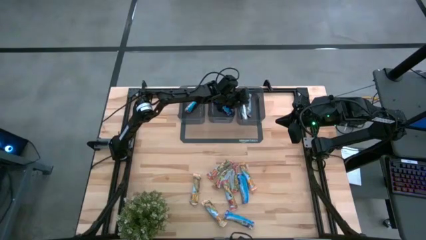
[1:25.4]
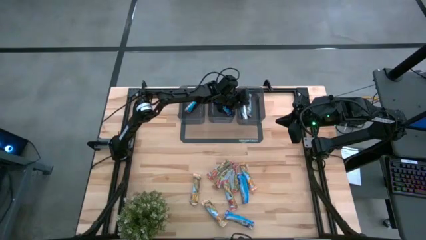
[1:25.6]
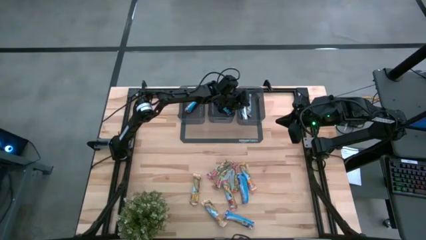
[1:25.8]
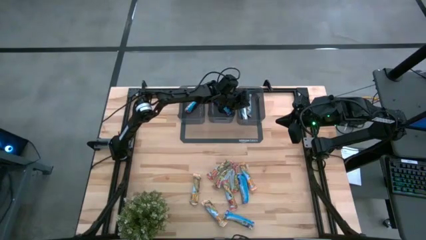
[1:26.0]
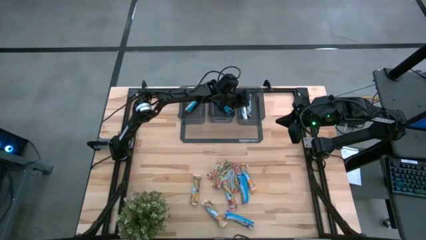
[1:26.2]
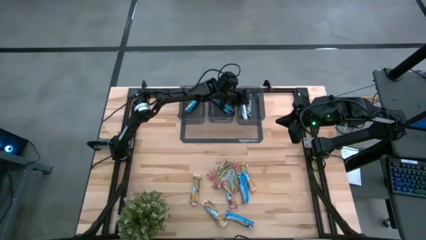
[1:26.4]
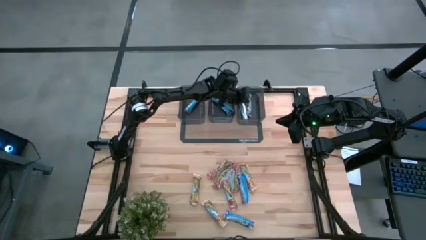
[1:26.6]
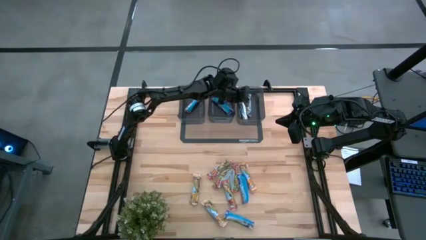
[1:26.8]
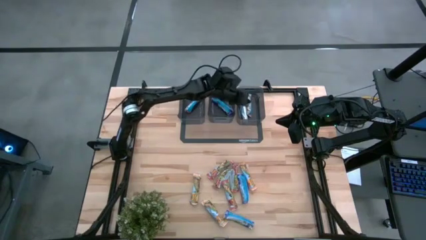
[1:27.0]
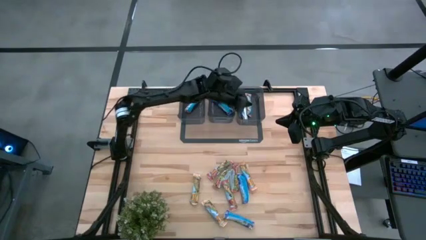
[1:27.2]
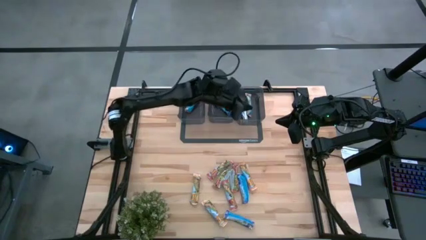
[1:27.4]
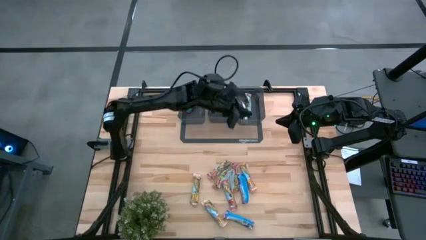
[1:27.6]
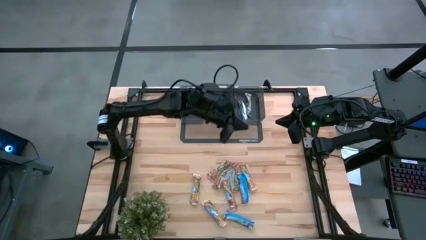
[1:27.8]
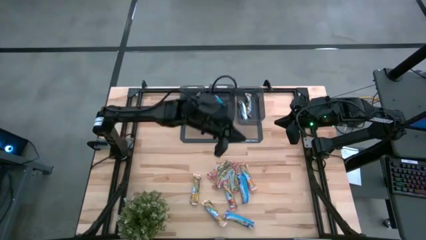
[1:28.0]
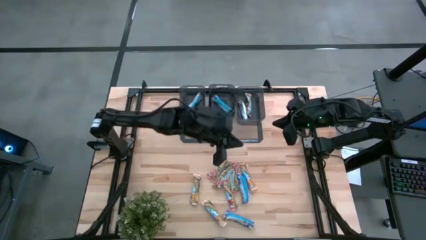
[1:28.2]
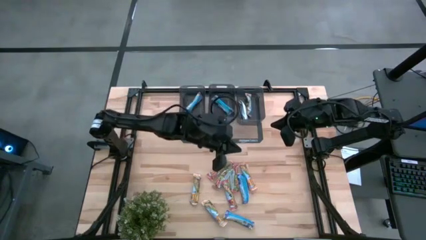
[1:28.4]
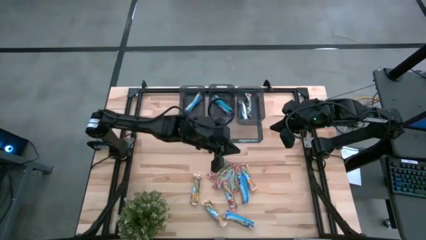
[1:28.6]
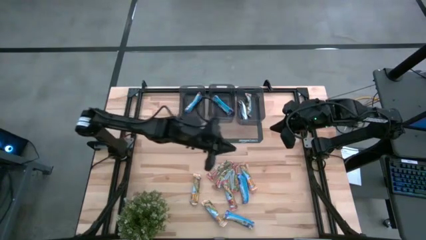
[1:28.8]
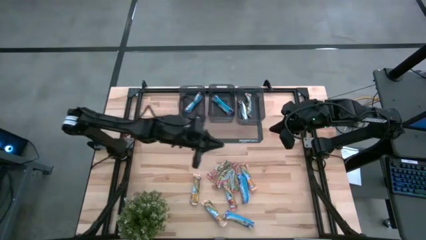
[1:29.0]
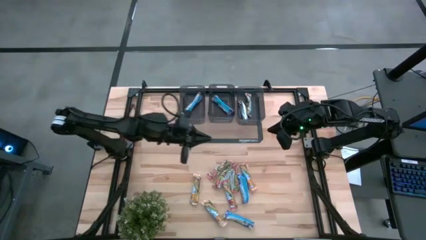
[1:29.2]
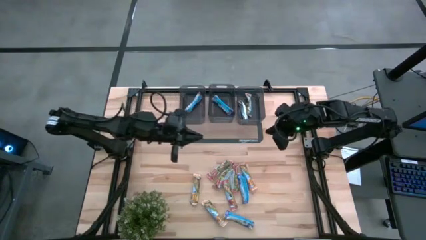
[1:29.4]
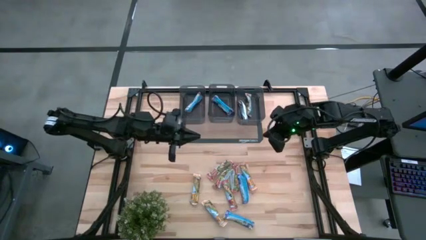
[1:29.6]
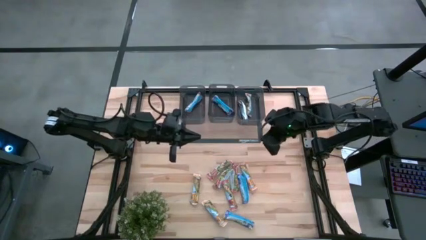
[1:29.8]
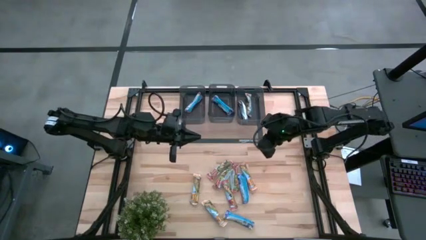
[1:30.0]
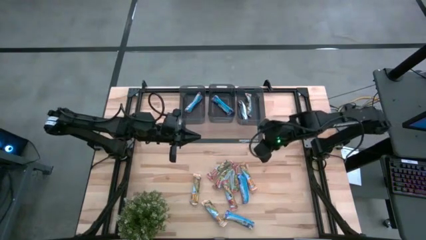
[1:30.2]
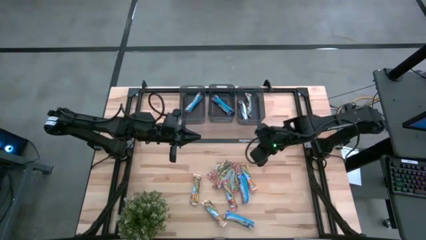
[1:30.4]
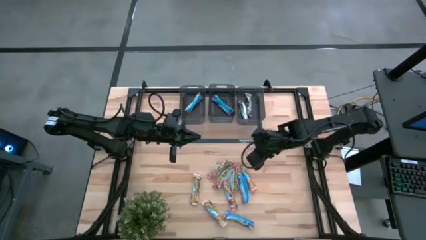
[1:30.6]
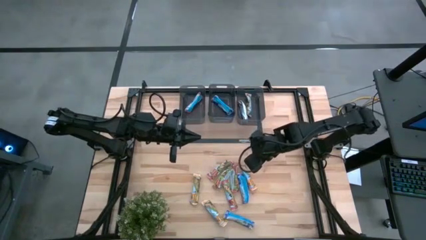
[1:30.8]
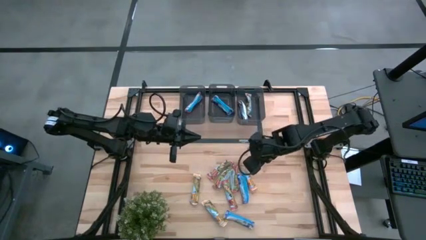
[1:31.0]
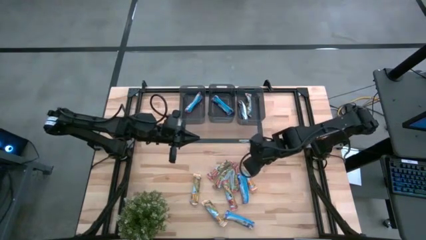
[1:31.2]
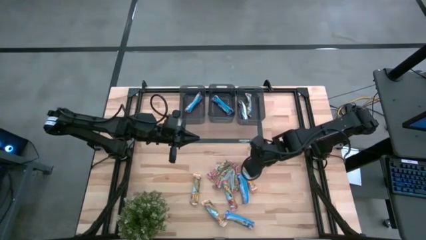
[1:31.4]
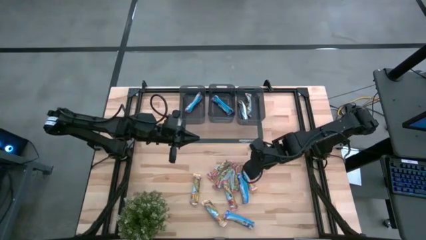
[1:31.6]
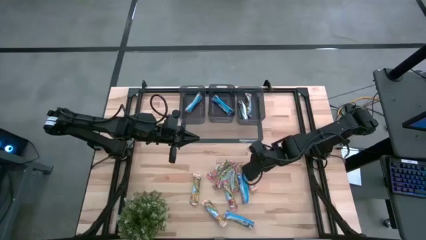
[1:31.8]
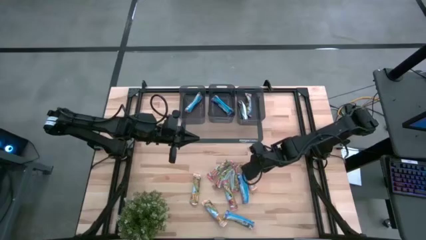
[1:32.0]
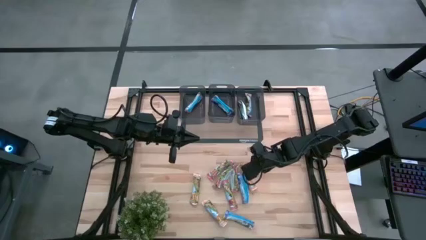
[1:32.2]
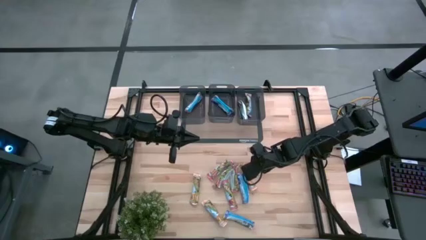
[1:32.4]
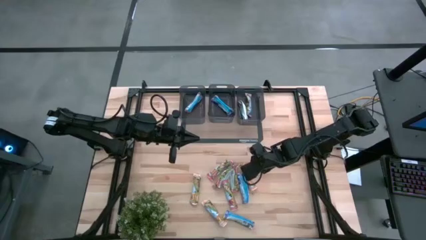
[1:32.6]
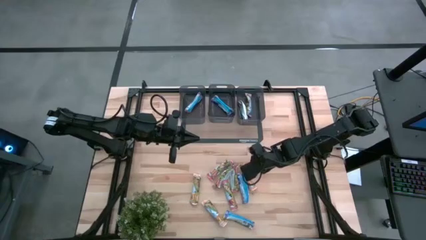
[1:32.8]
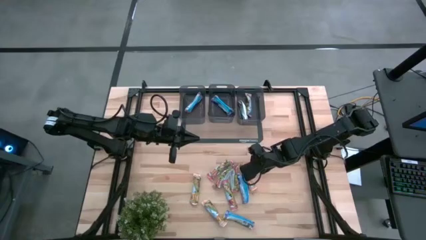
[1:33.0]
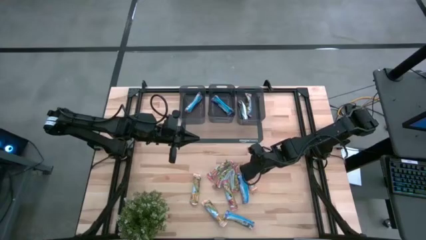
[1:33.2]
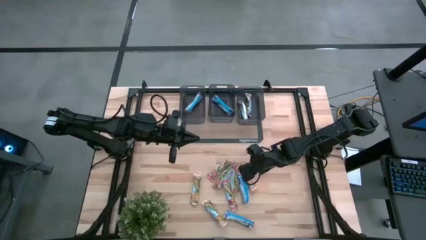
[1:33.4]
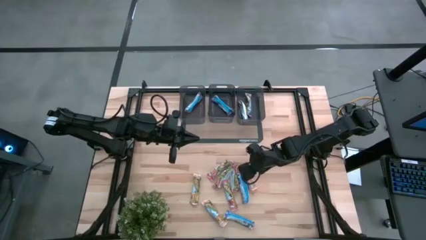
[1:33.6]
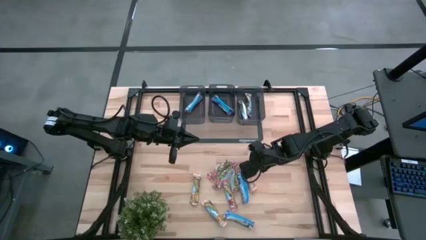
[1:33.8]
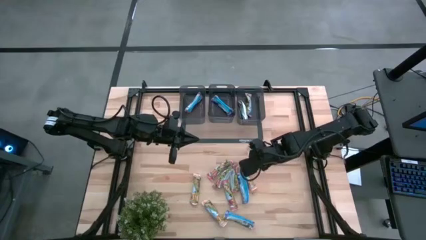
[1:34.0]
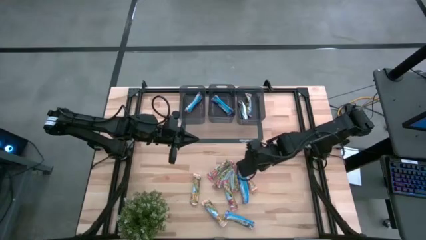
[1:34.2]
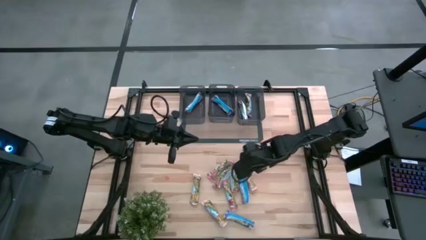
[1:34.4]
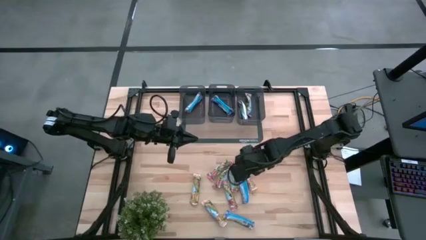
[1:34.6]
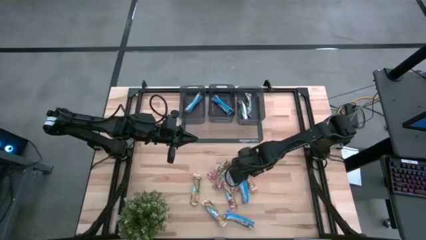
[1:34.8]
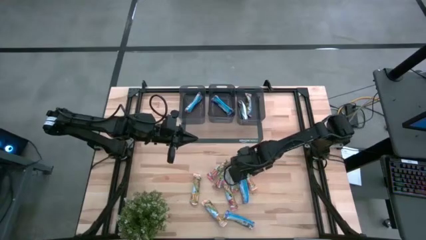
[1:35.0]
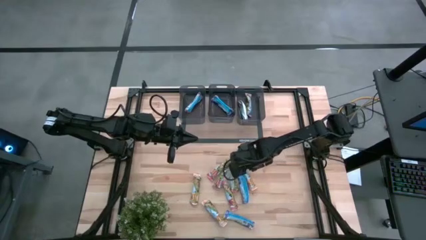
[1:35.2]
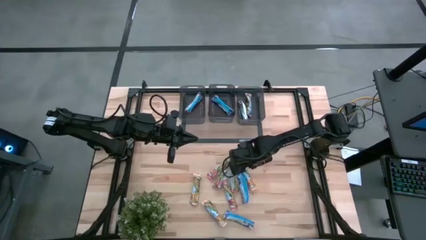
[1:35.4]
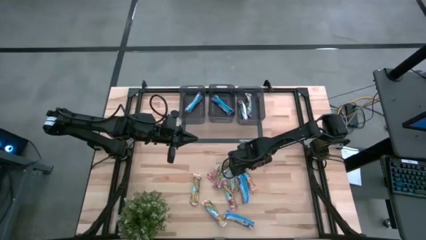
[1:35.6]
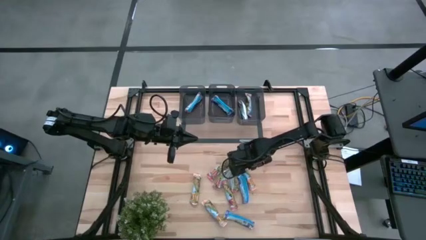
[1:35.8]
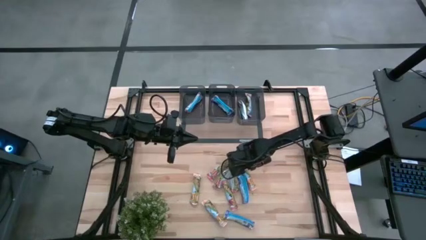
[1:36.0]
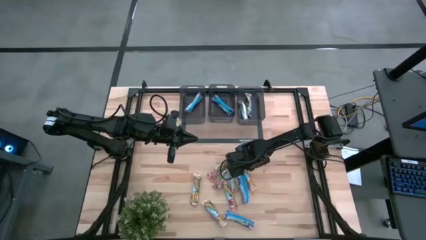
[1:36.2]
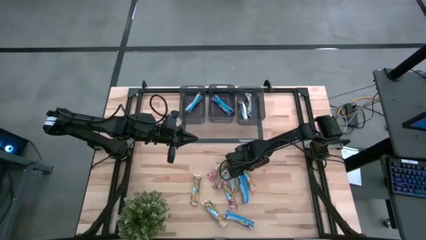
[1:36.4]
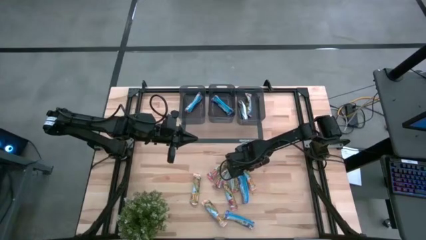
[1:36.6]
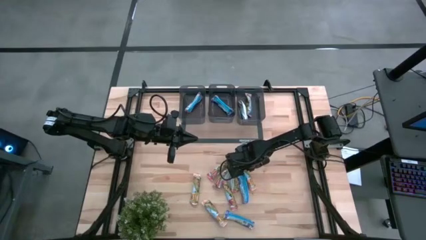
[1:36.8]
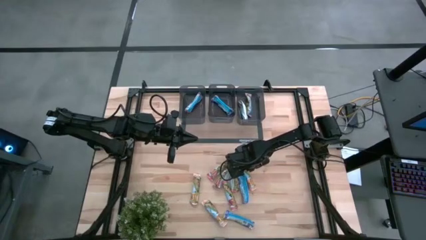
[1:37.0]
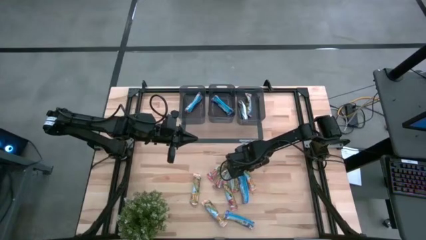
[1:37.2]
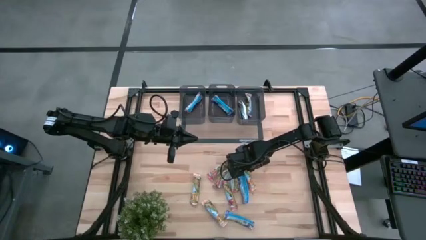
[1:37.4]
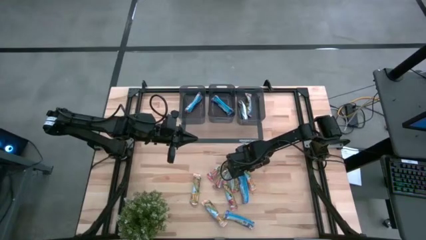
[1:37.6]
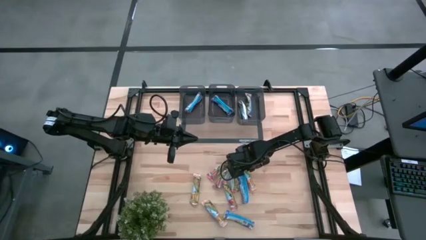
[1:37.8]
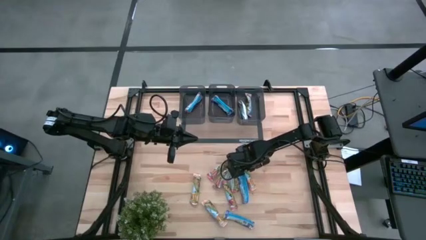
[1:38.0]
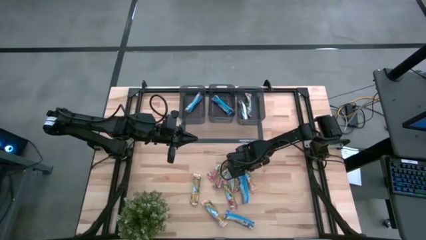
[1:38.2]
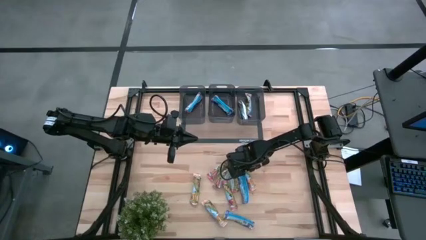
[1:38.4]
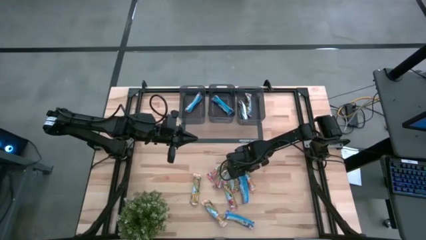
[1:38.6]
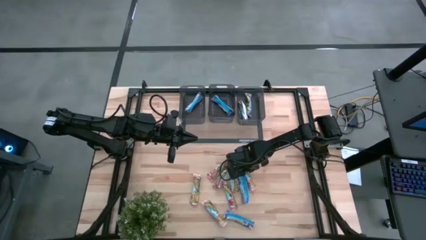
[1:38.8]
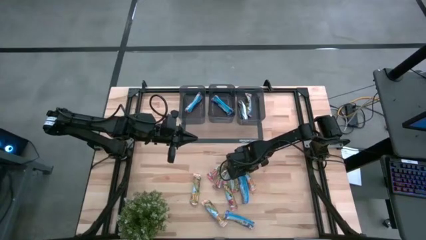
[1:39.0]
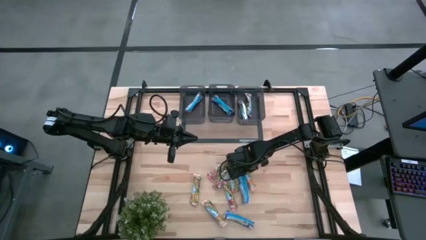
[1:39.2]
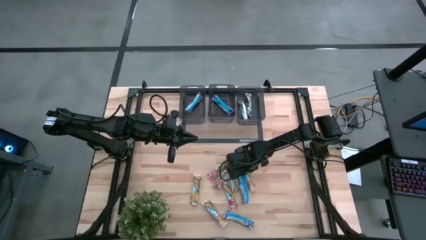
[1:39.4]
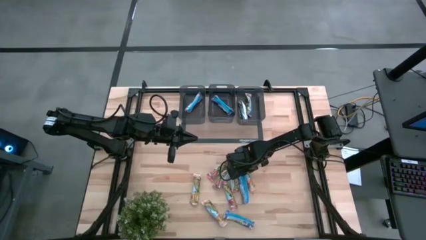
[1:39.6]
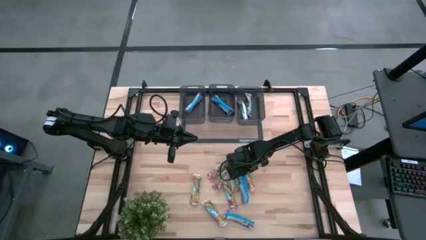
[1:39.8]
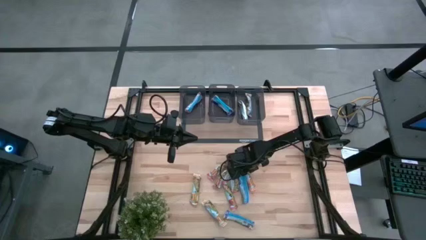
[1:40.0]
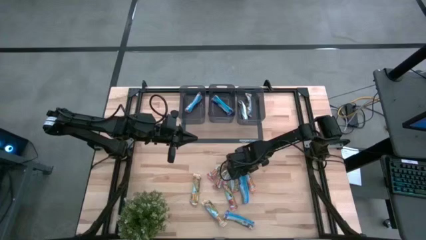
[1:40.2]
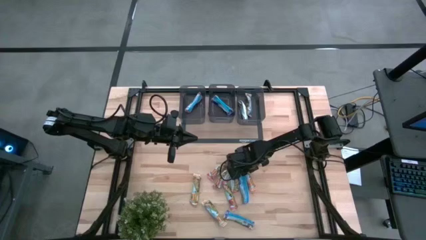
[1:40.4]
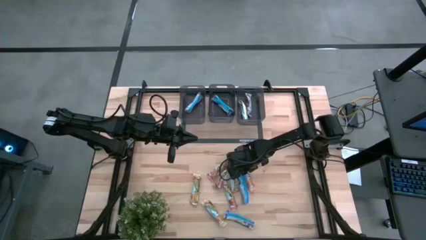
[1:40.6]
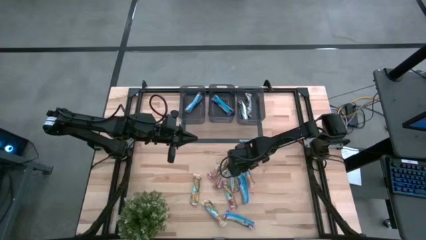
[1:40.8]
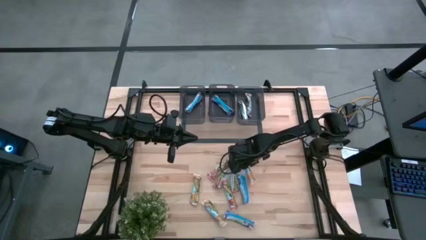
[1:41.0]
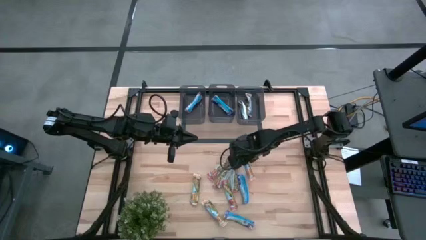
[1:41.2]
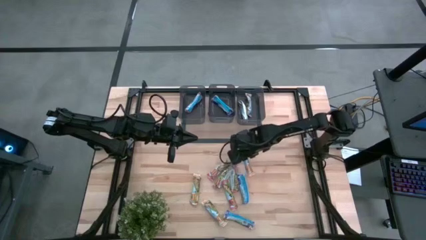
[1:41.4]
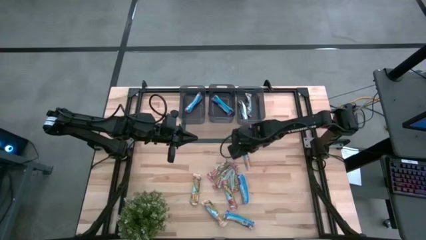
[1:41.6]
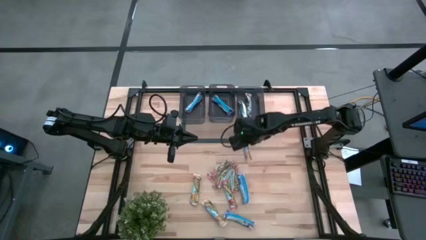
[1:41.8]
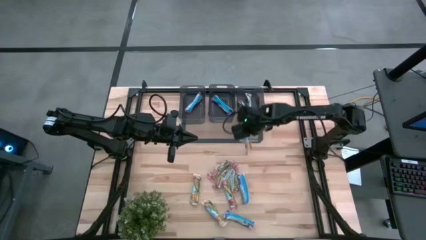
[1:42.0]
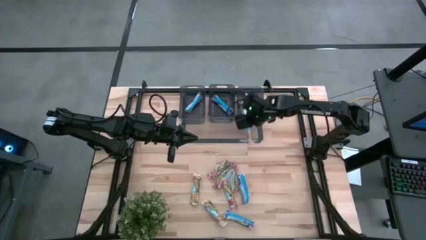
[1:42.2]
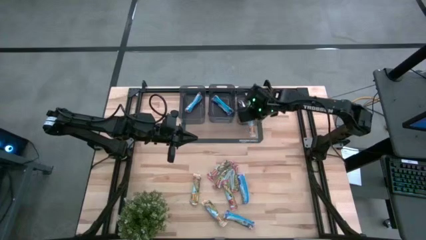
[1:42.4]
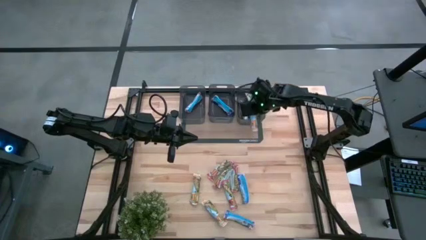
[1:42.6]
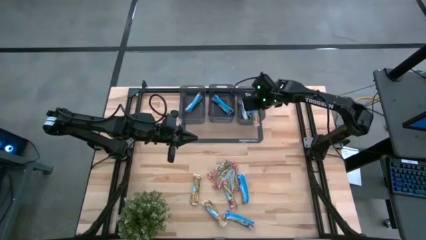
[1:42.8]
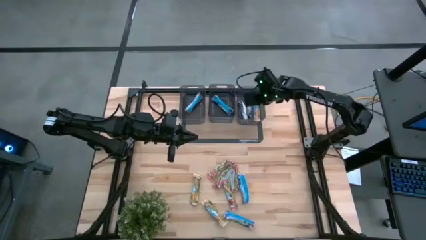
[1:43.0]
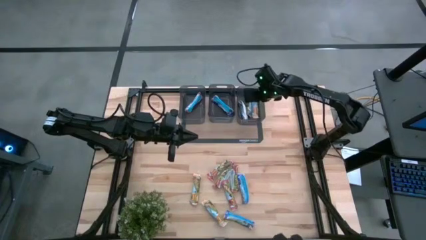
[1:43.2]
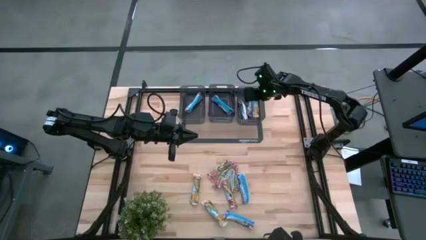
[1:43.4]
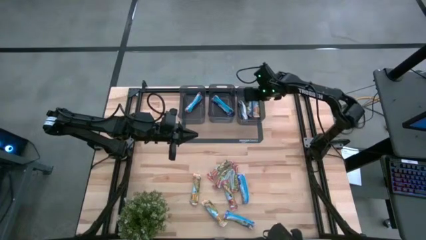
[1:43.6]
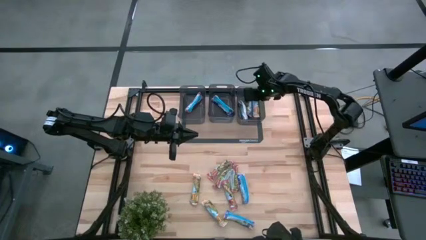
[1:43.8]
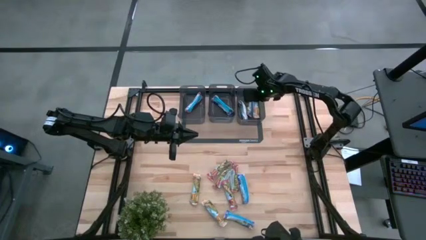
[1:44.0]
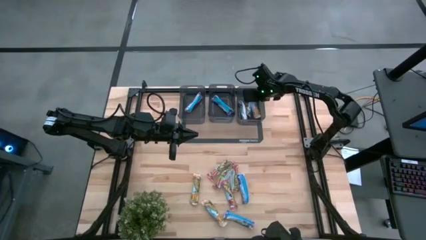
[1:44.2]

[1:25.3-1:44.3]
Task: Pick and place Granola Bars by type
Put the yellow granola bar into the right black bin
